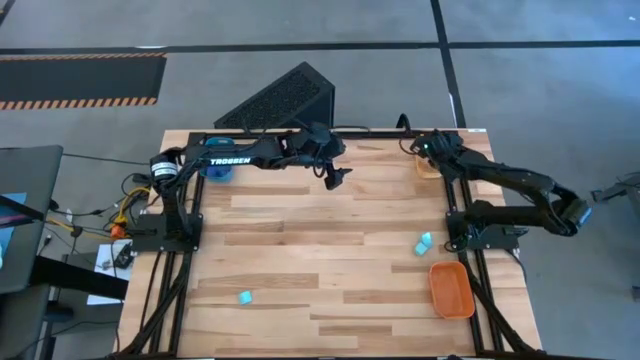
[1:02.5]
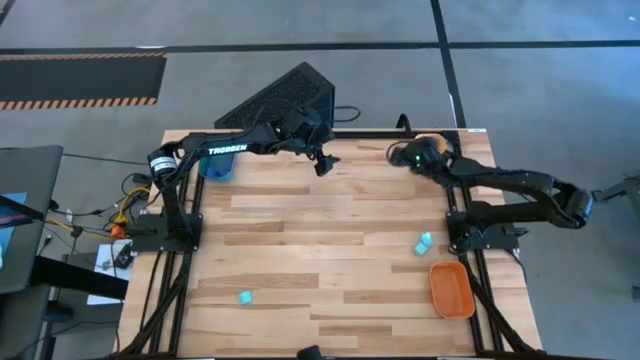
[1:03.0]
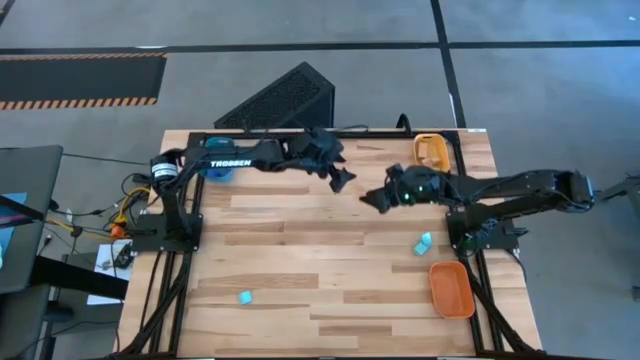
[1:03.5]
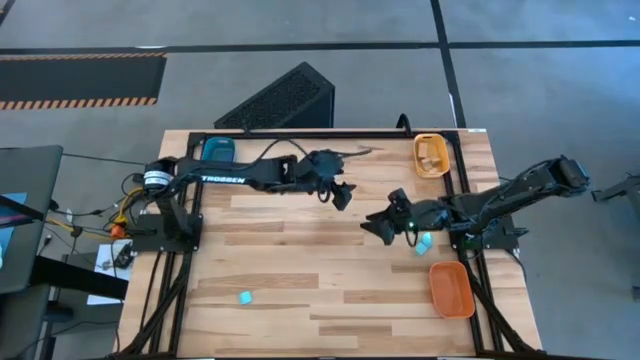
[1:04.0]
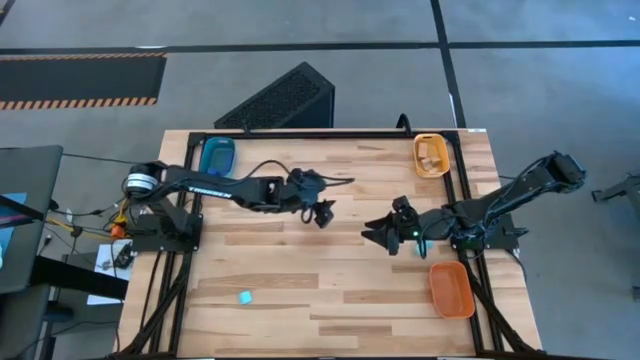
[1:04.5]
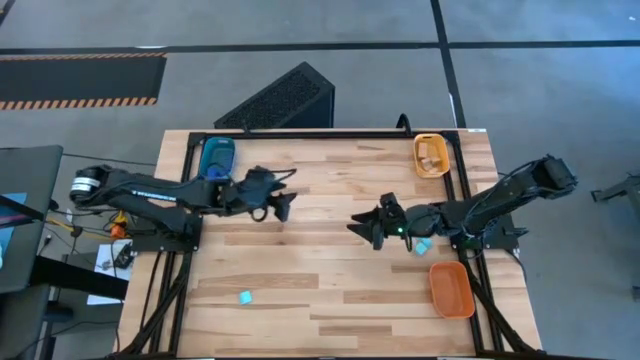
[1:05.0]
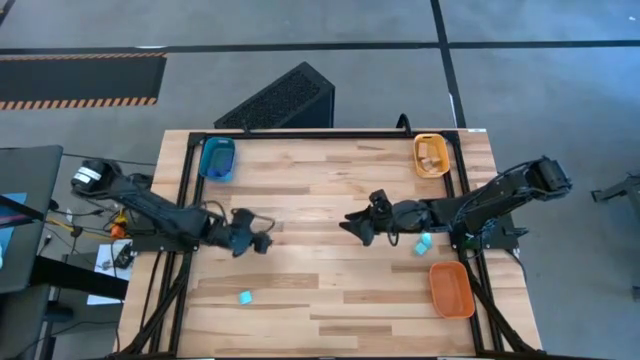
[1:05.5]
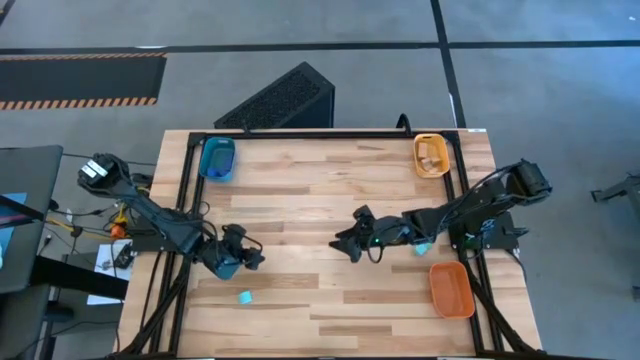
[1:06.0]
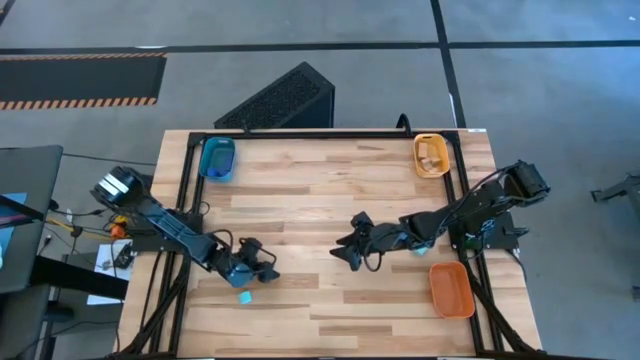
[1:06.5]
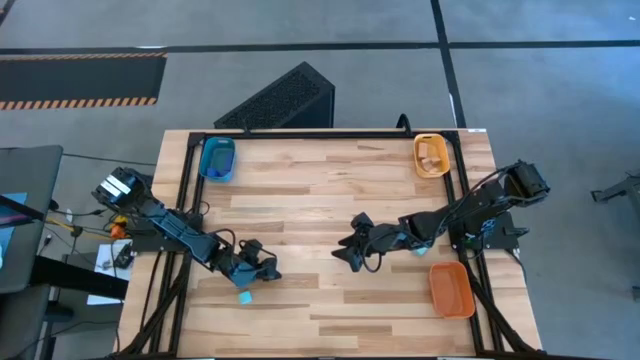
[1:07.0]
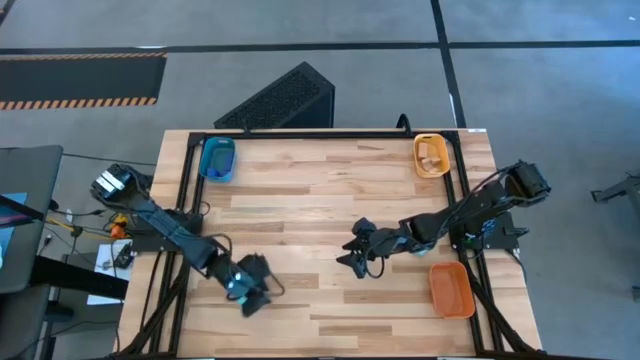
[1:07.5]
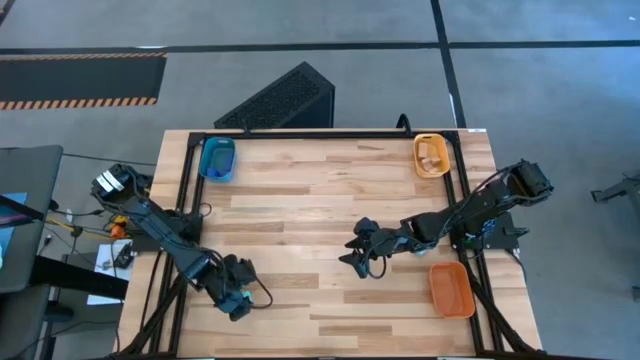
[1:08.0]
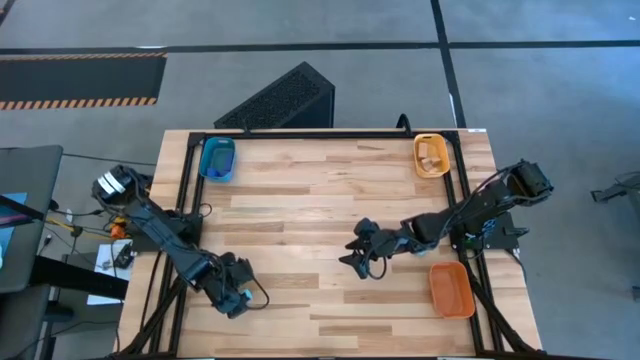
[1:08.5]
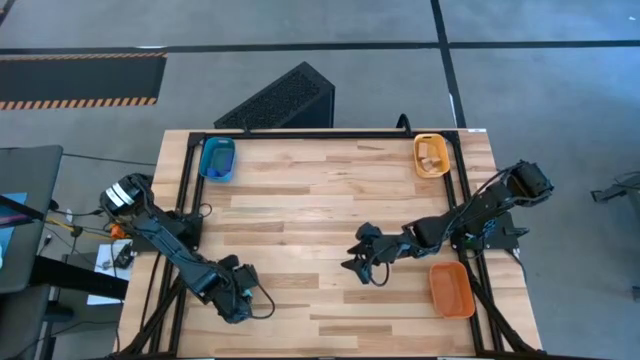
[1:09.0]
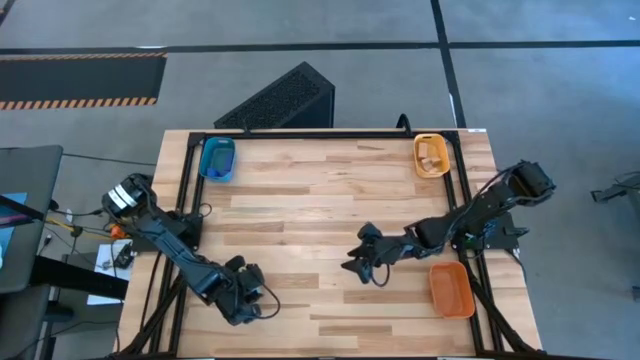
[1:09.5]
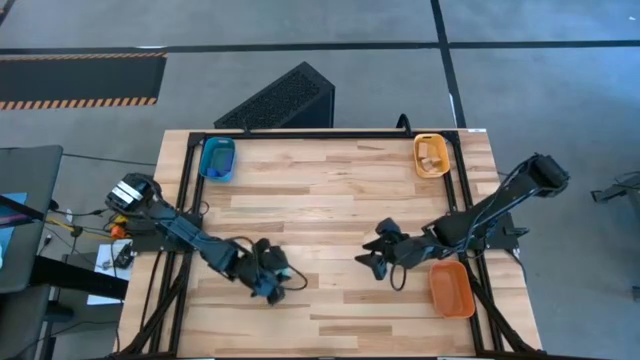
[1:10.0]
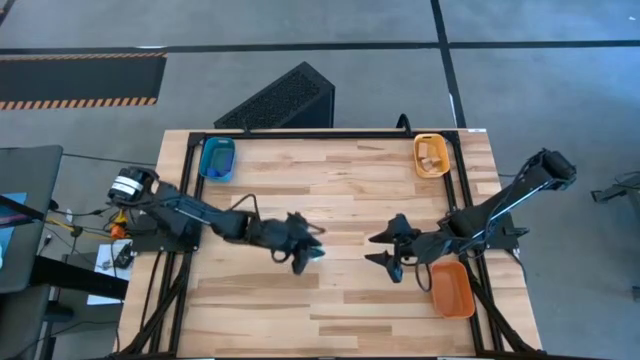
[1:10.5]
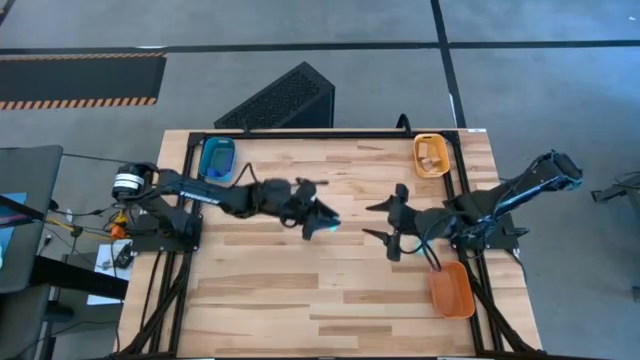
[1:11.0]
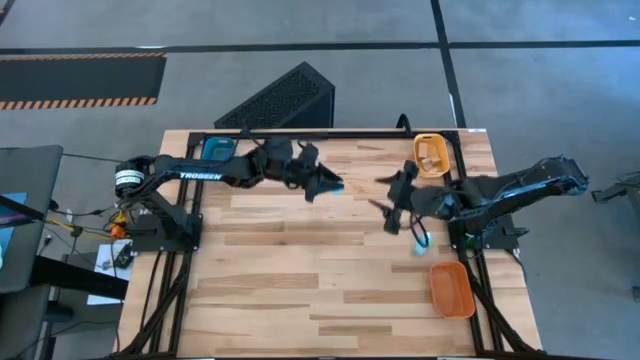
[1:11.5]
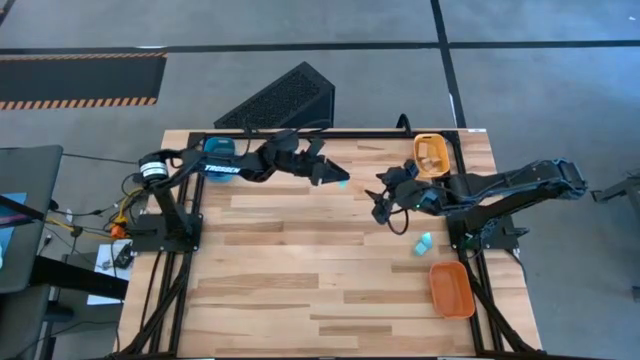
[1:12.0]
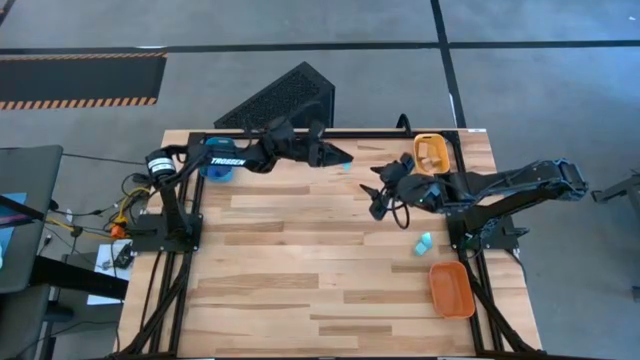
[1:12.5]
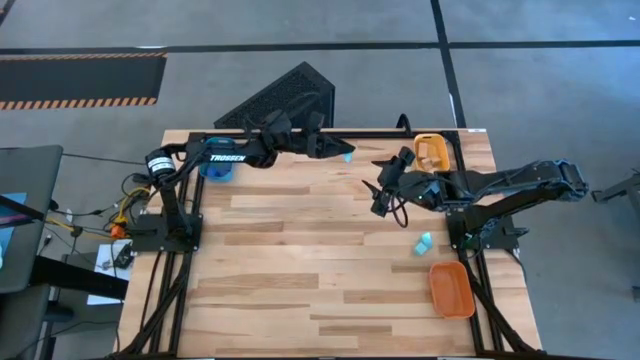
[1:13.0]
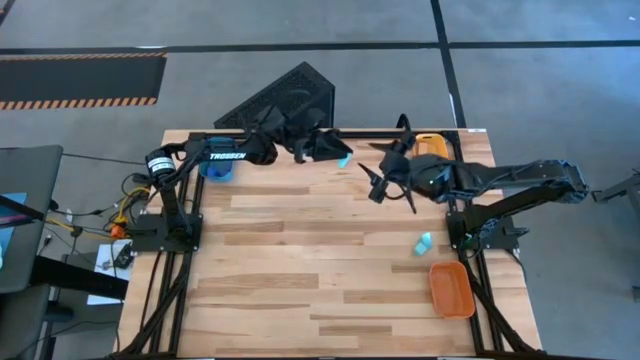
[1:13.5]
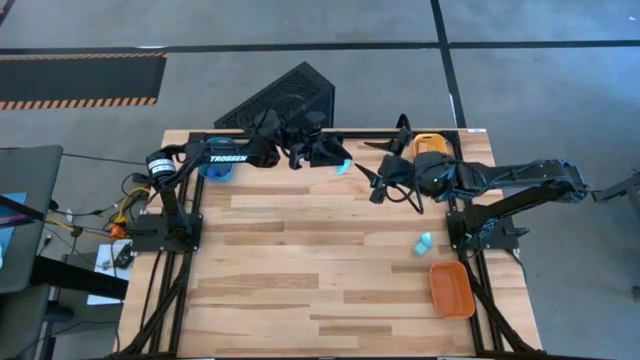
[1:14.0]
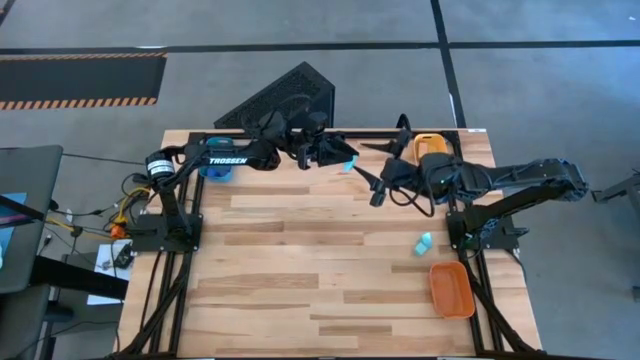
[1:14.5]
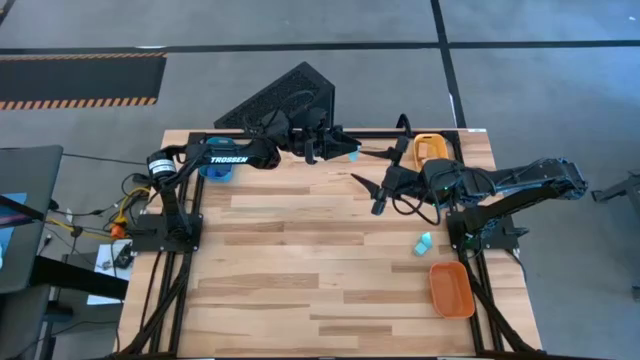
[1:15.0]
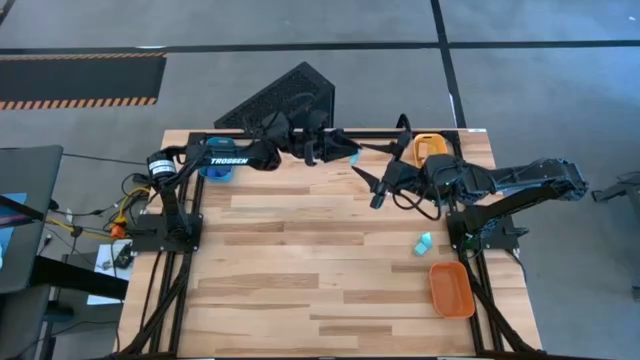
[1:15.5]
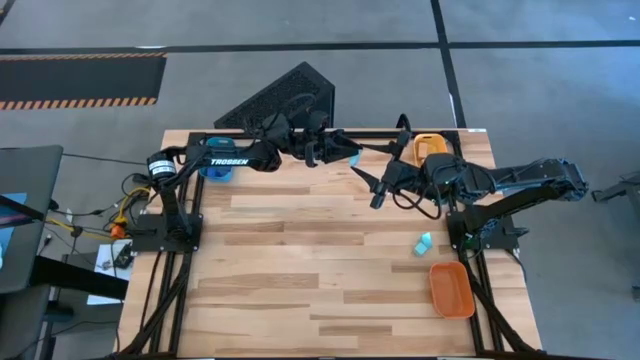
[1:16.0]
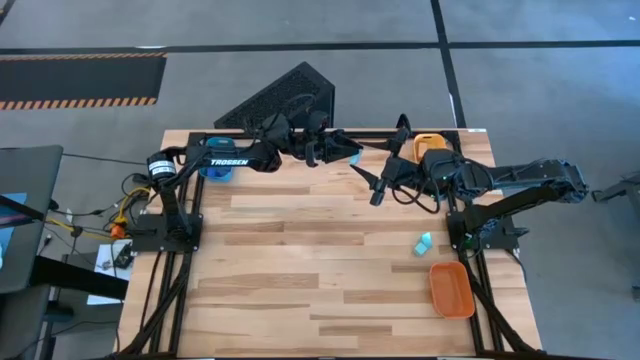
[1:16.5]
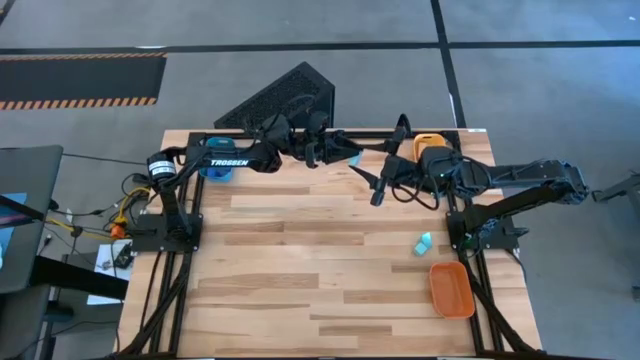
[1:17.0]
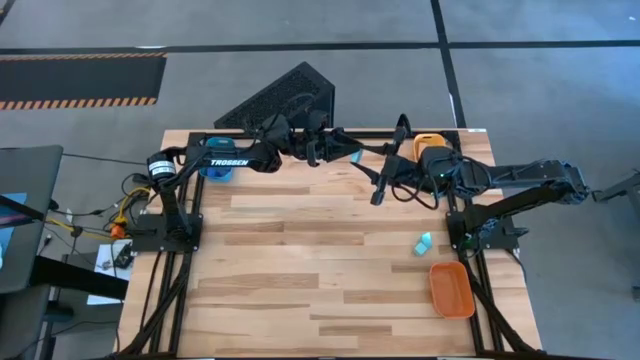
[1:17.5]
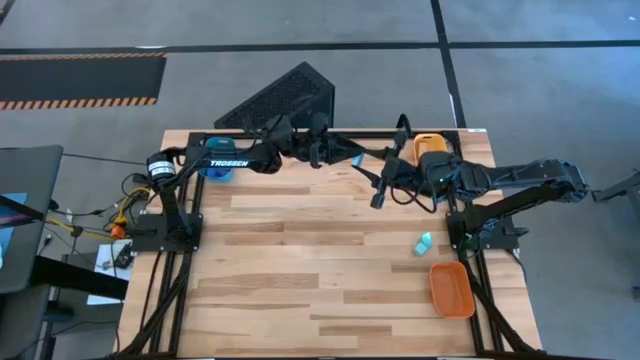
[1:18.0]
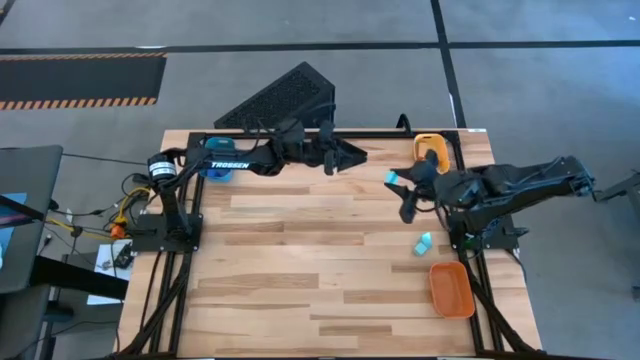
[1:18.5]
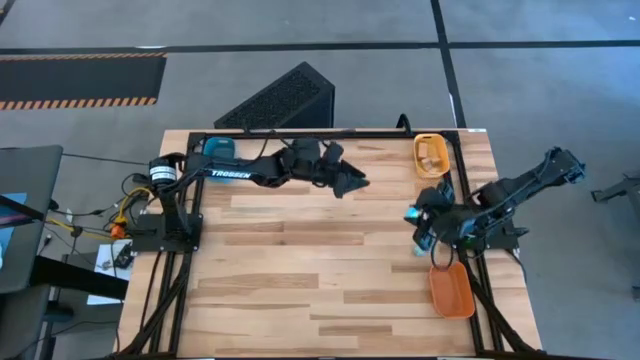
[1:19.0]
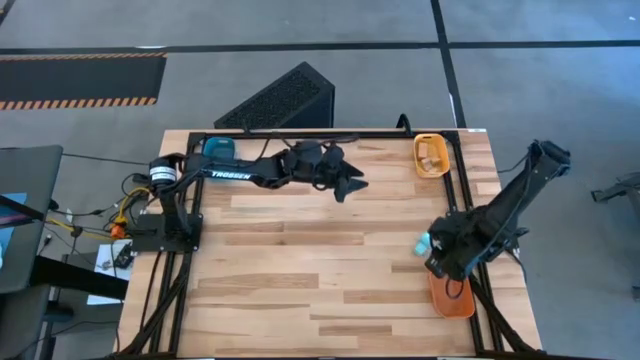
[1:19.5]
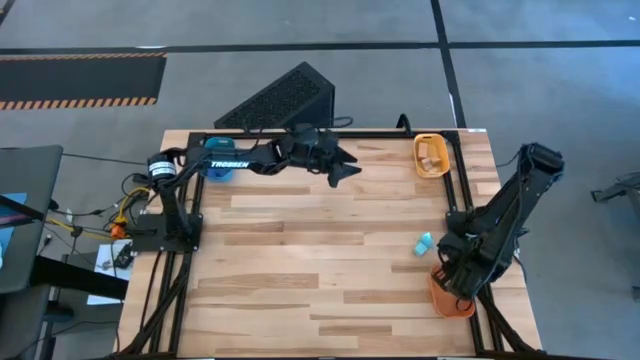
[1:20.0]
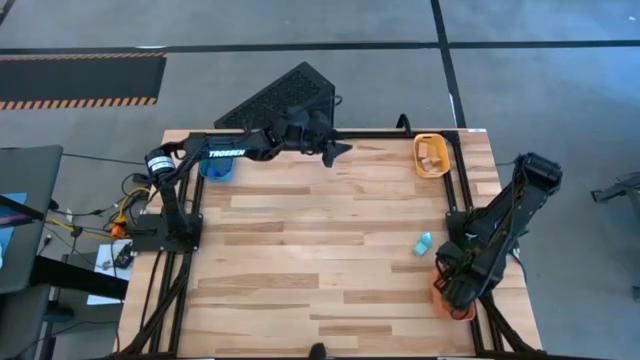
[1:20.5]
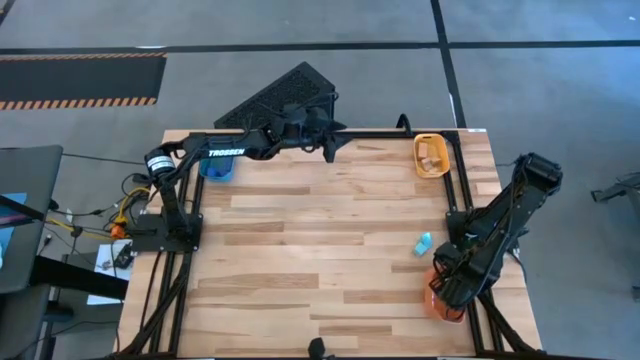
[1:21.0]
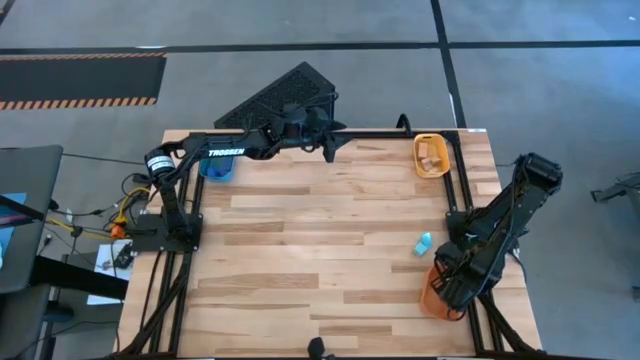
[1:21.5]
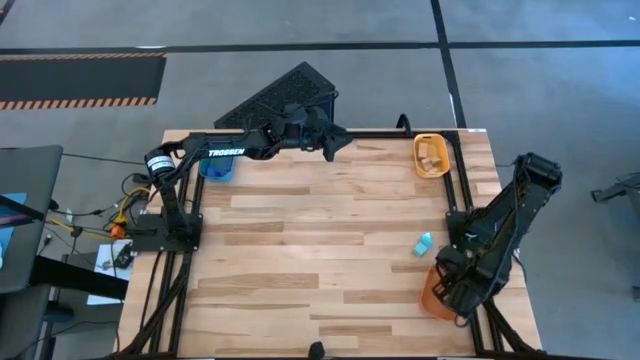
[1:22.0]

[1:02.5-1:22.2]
Task: Sort & place blocks by color
Put the bottom left light blue block into the orange bin
